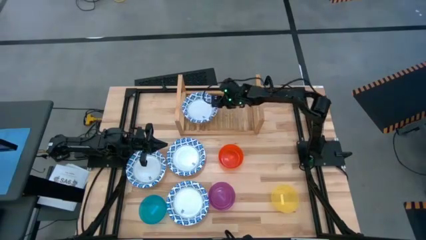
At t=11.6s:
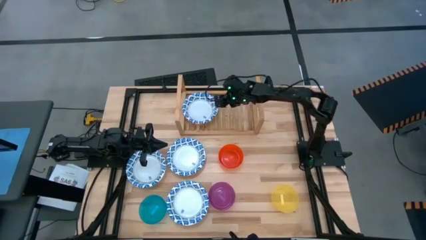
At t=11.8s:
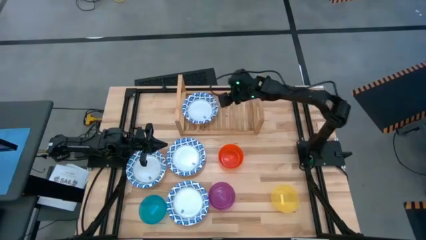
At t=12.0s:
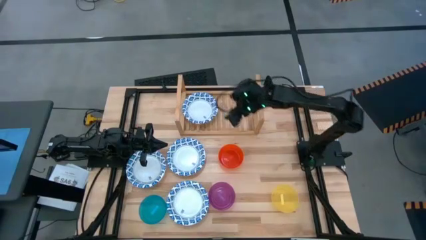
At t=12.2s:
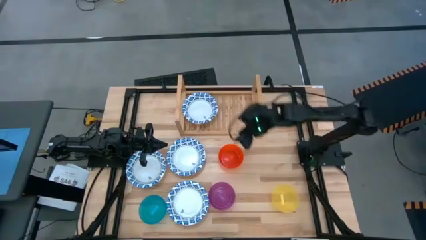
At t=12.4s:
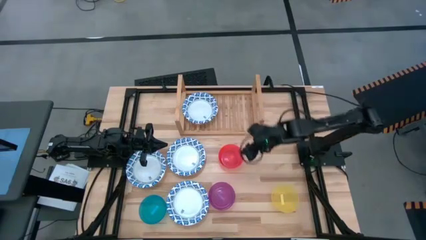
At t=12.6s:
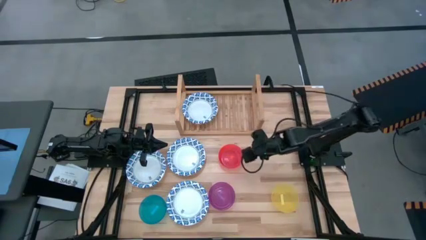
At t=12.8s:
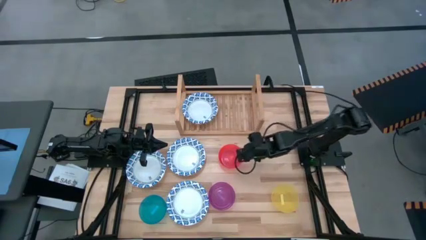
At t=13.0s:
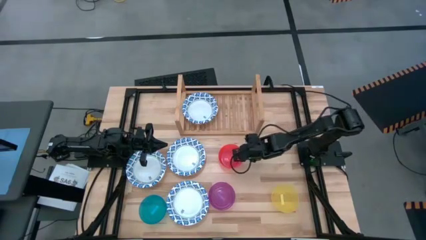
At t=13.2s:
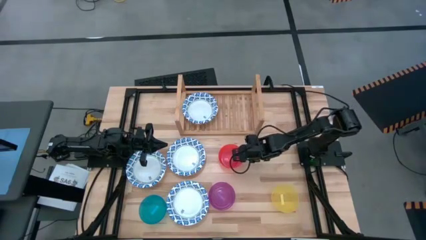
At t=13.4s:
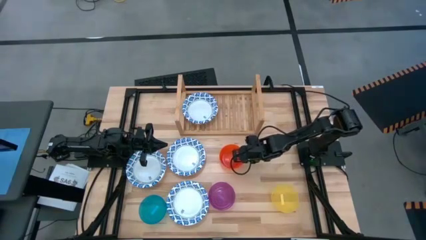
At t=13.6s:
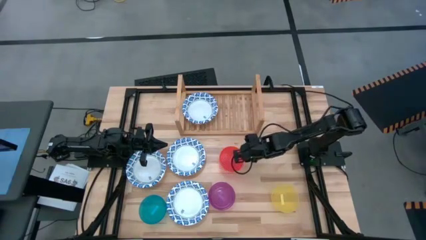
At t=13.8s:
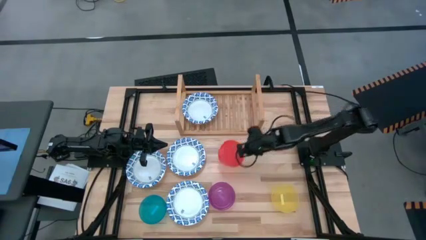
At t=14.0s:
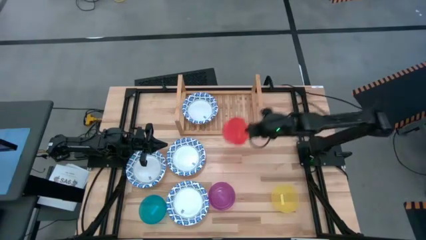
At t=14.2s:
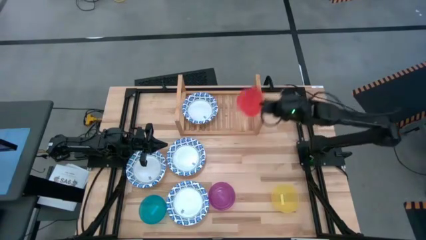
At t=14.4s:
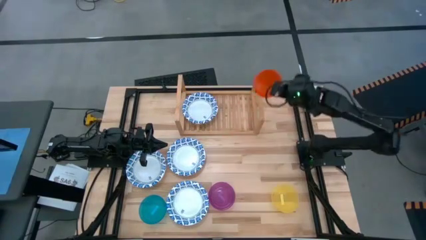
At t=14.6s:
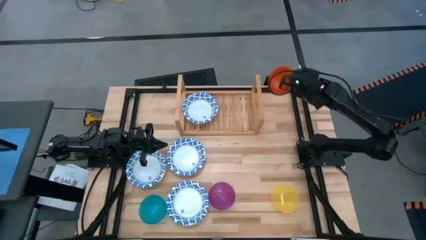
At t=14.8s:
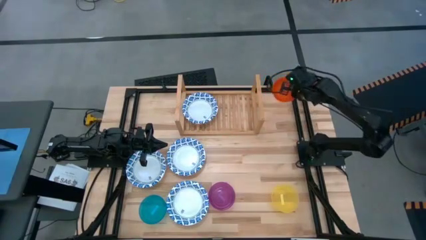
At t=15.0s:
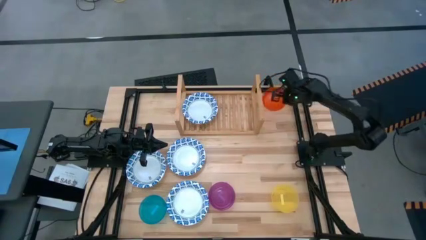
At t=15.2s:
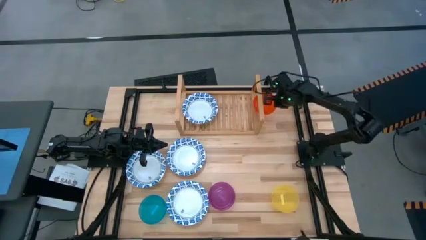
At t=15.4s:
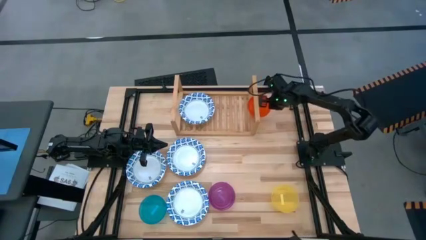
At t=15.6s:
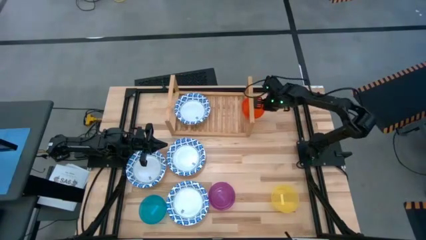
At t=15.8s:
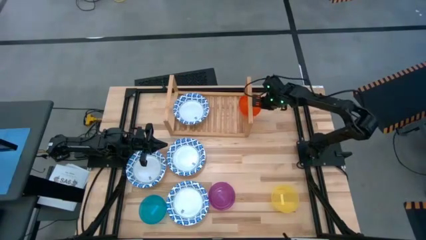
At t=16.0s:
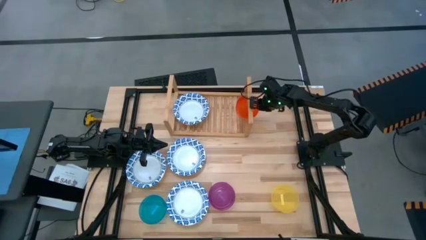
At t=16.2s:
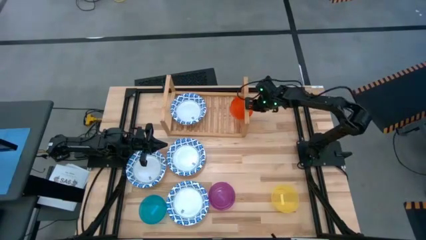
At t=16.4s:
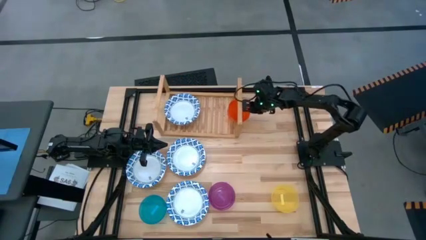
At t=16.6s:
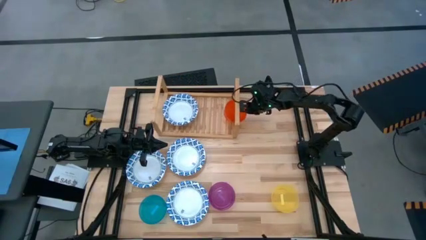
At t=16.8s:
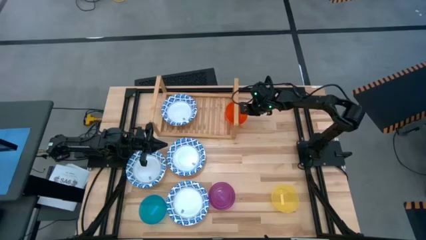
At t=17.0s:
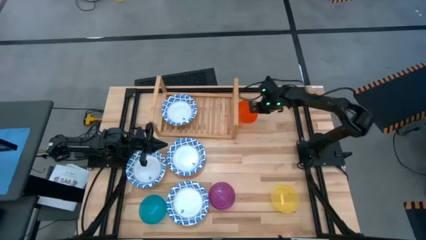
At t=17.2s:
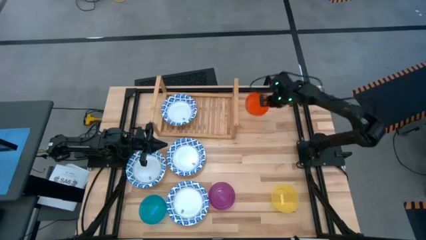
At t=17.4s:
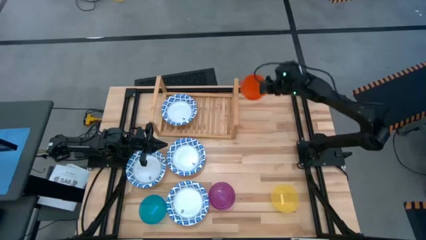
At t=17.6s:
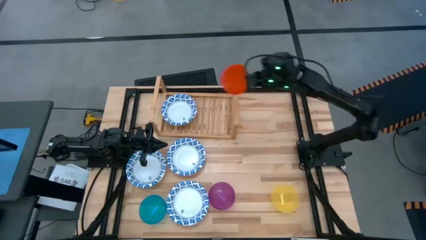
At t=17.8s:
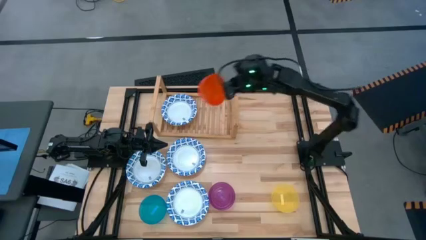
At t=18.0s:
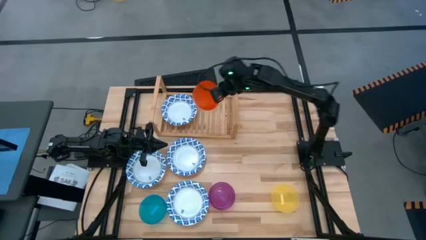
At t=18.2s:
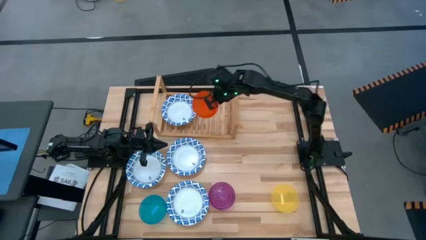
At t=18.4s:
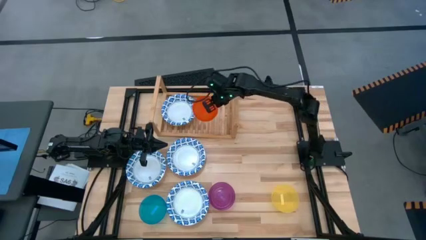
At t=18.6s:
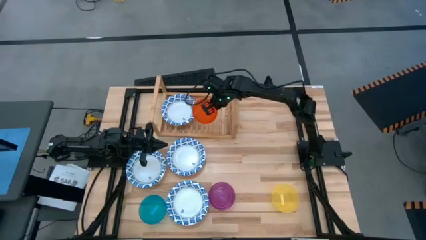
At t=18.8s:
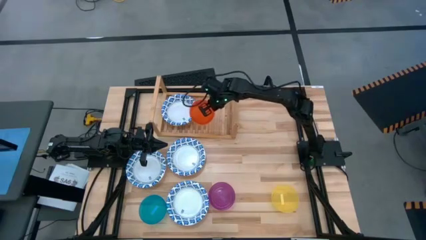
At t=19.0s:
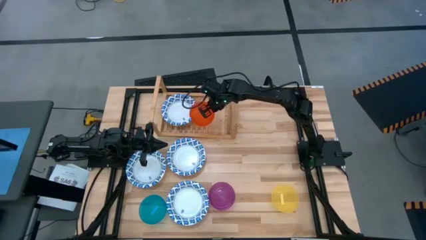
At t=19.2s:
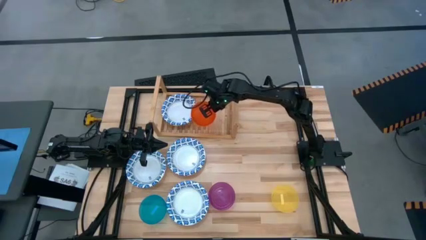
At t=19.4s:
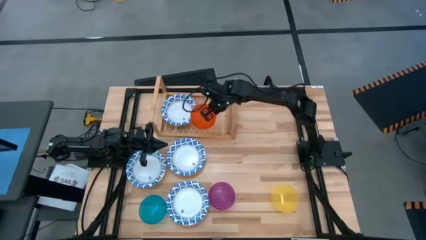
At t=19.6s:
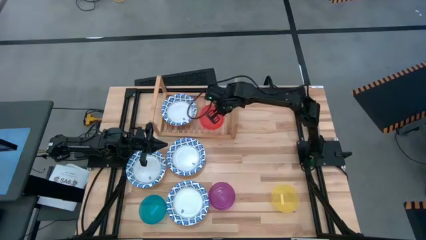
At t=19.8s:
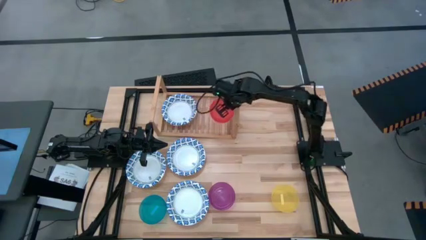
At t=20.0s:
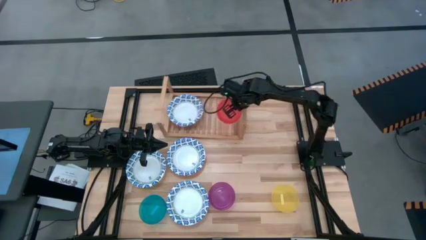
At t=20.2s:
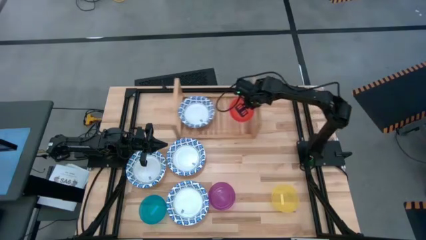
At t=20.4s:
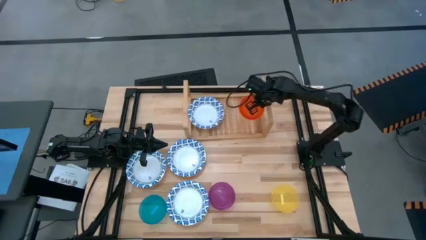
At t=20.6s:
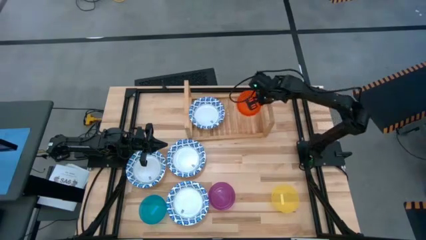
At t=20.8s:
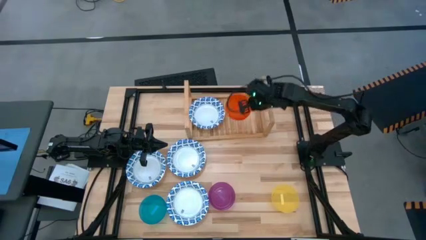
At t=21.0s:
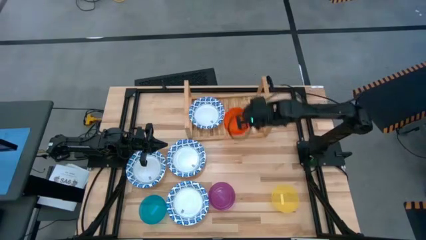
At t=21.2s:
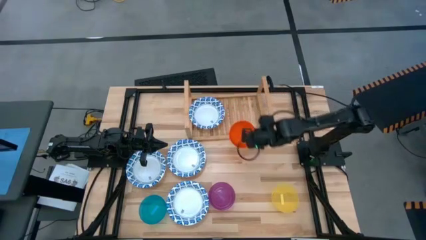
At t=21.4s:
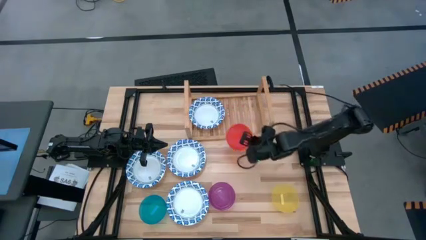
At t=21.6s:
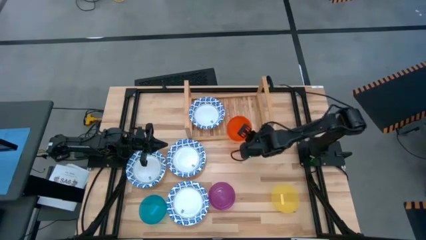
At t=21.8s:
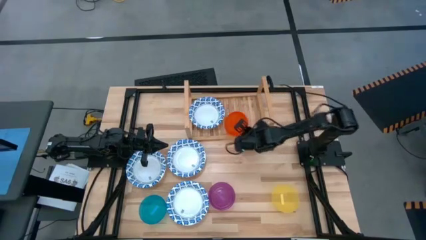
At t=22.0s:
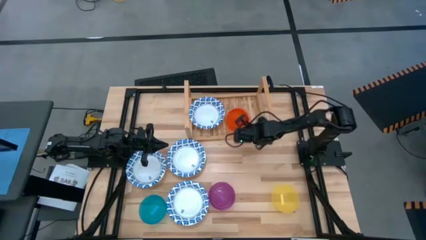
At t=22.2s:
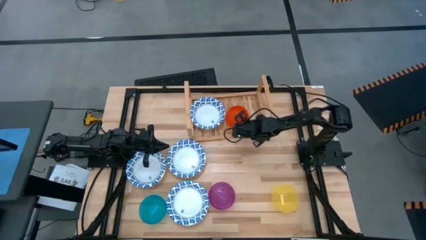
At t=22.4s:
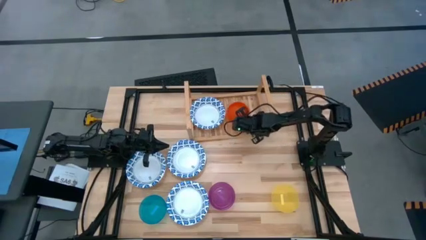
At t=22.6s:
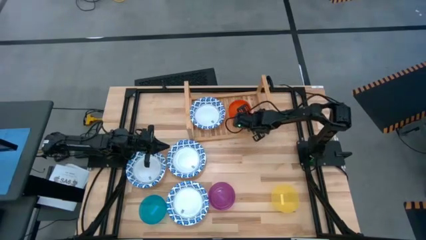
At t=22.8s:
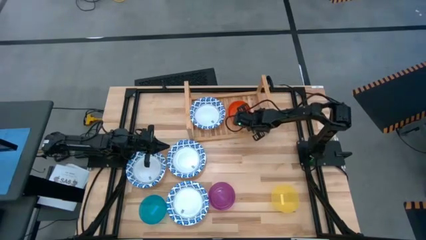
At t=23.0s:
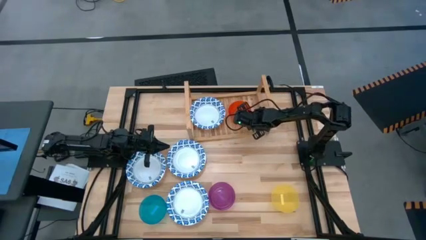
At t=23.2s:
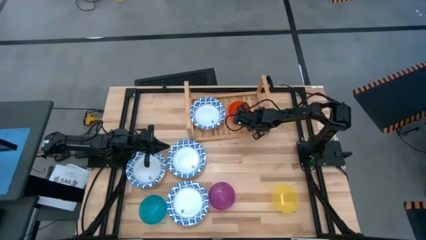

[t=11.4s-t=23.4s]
Task: Place and stack bowls onto a shelf
Put the orange transparent bowl on the shelf

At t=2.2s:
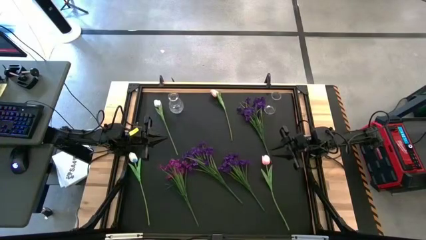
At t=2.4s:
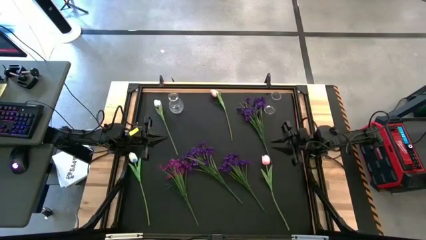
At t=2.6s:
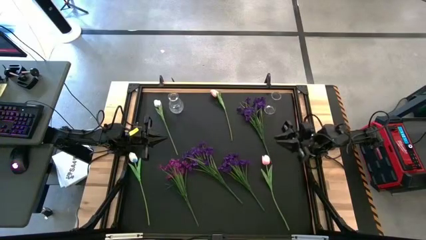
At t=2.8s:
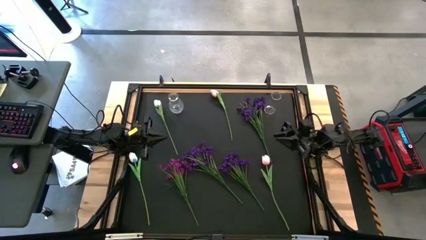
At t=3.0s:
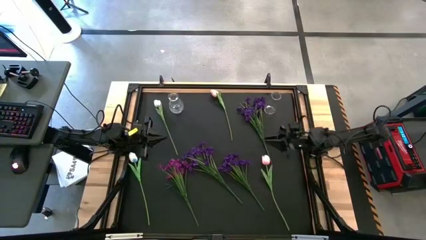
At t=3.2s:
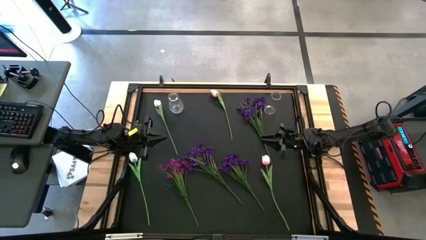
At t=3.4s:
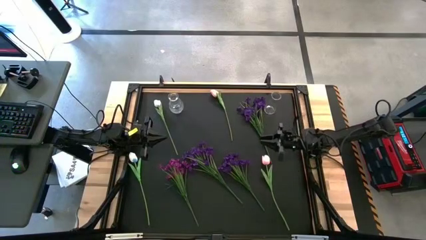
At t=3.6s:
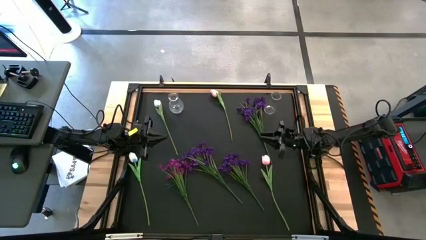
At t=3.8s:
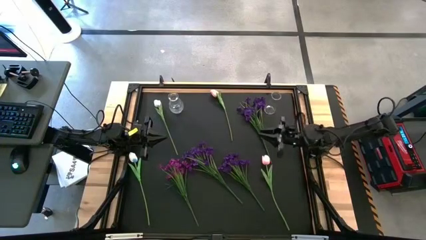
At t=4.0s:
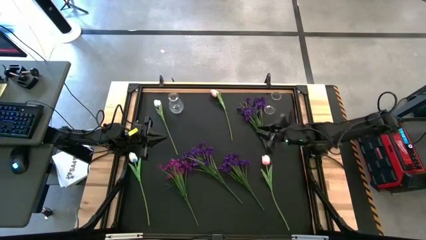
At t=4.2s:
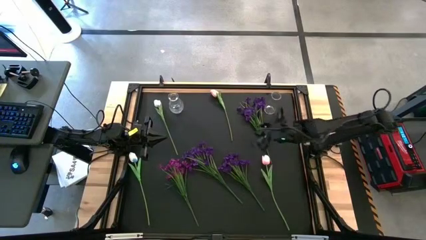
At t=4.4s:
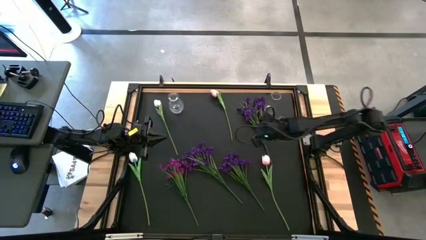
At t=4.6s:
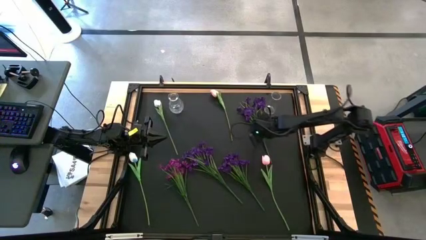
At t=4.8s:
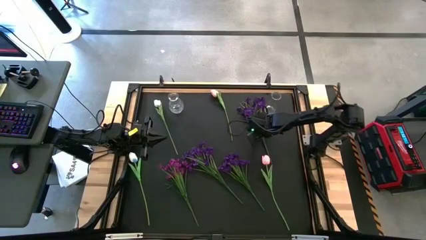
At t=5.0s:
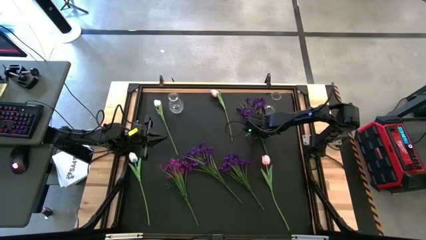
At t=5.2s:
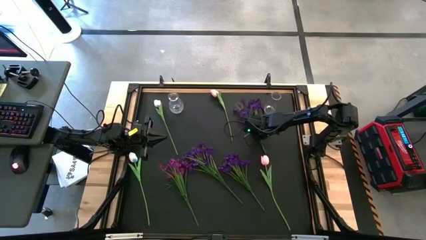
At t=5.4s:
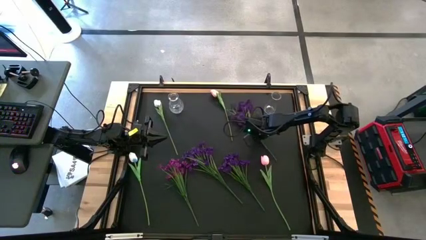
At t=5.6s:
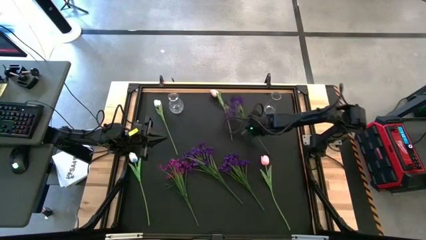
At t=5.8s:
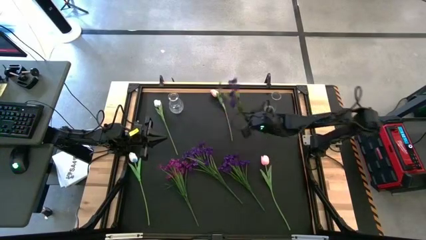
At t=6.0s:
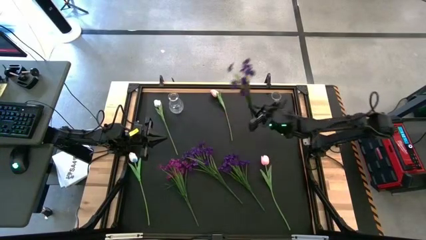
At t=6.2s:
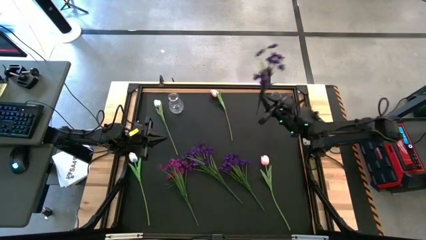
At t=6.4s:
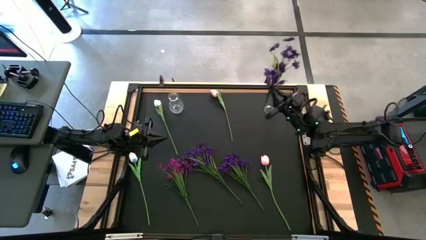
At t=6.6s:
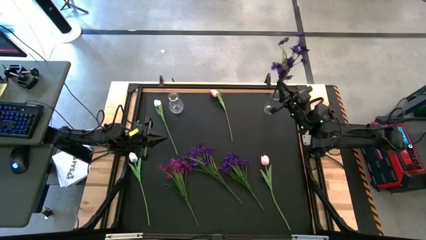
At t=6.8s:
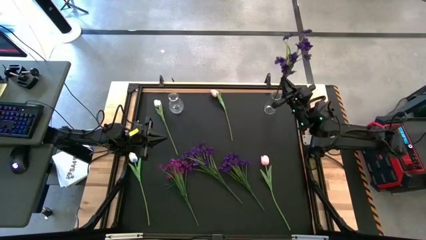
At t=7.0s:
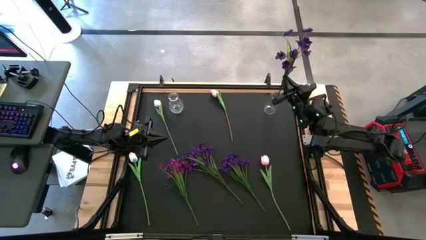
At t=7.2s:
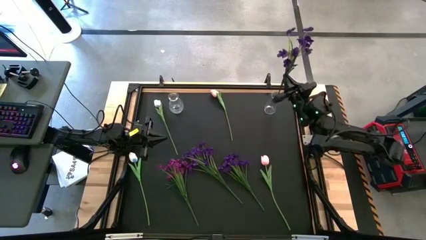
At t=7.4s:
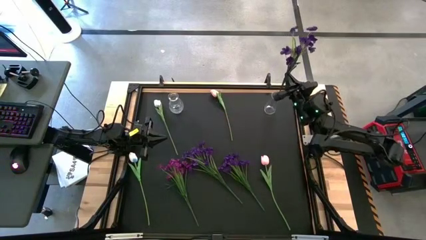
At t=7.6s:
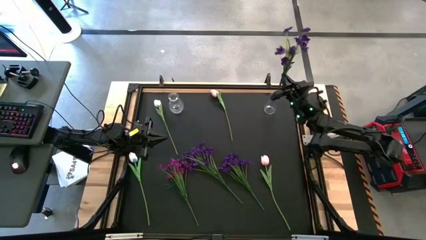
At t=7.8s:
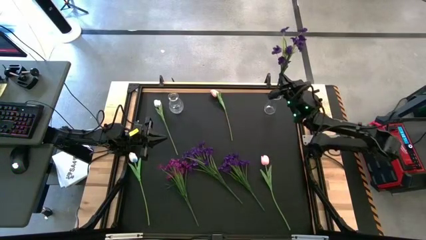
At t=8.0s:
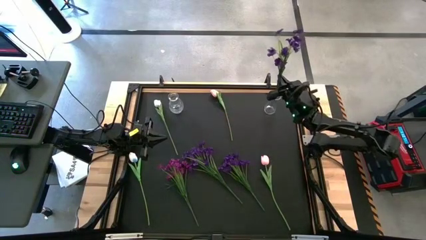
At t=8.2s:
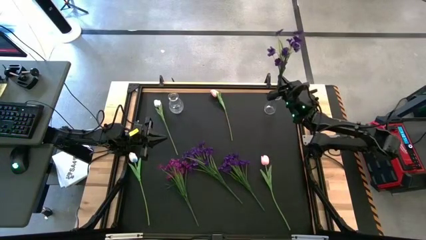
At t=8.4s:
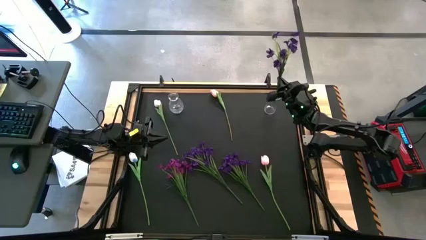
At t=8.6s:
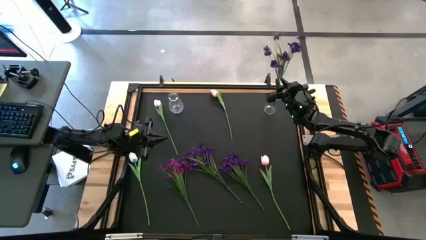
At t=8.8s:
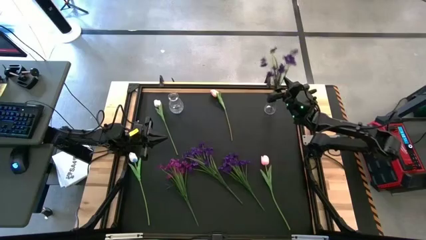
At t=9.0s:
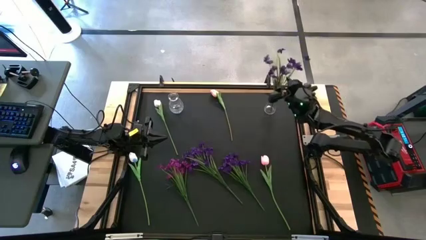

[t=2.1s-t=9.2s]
Task: Sort flowers into vase by color
Put the top purple flowers into the right transparent vase
